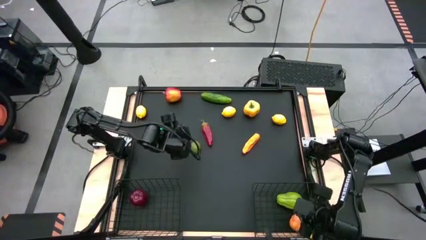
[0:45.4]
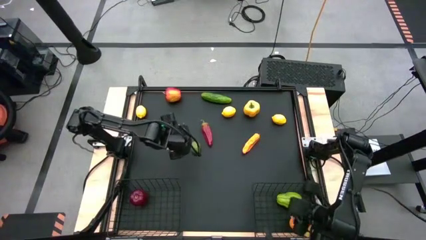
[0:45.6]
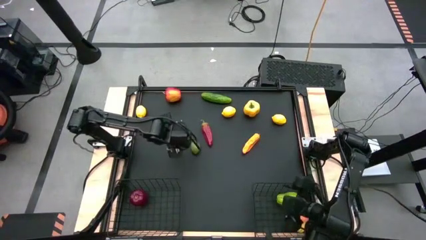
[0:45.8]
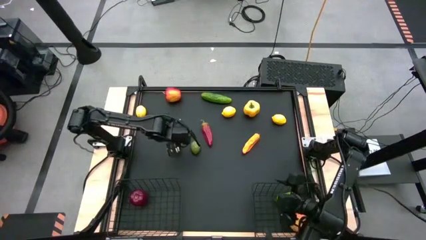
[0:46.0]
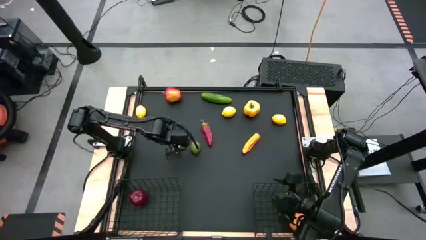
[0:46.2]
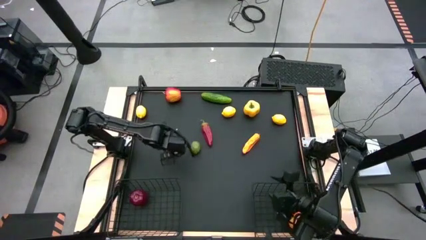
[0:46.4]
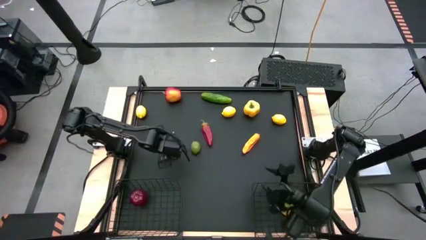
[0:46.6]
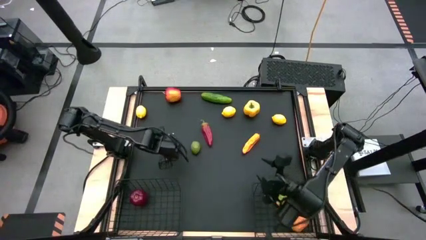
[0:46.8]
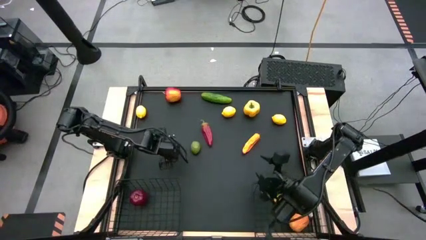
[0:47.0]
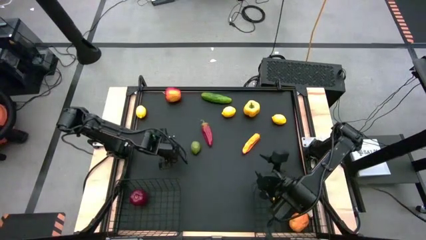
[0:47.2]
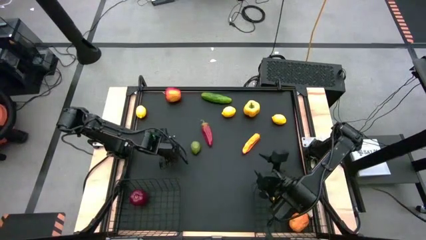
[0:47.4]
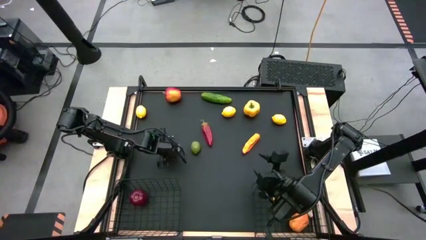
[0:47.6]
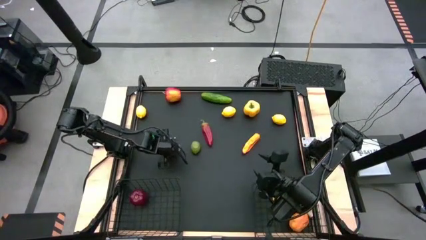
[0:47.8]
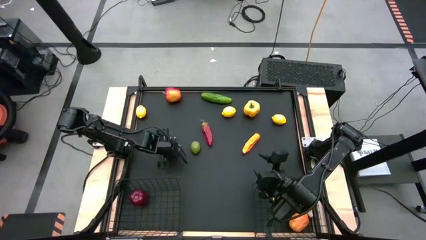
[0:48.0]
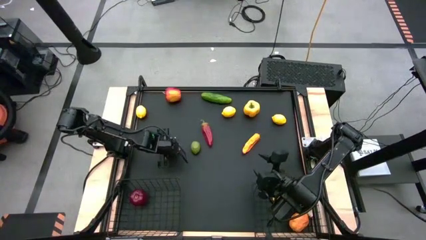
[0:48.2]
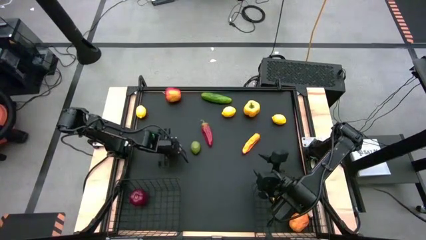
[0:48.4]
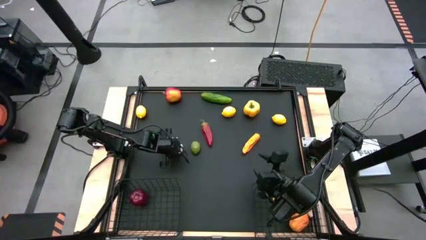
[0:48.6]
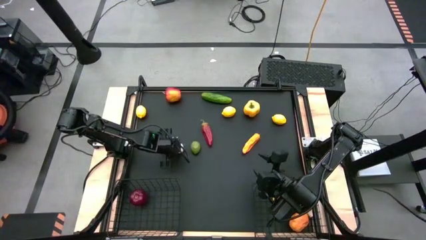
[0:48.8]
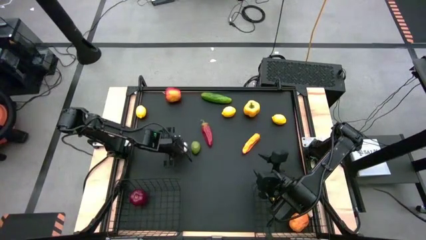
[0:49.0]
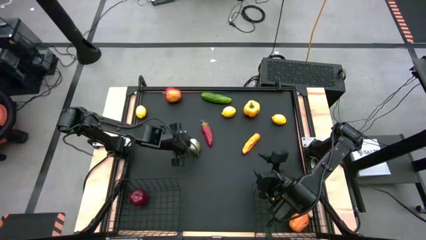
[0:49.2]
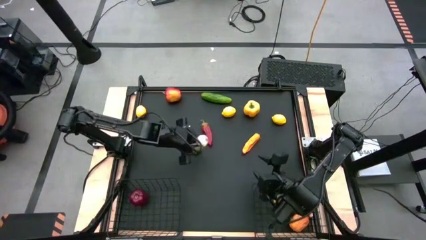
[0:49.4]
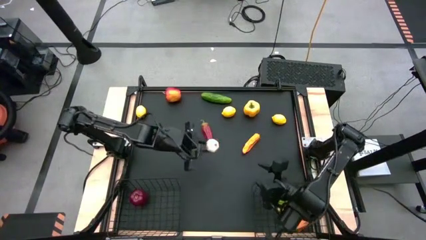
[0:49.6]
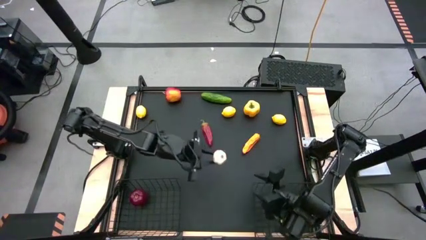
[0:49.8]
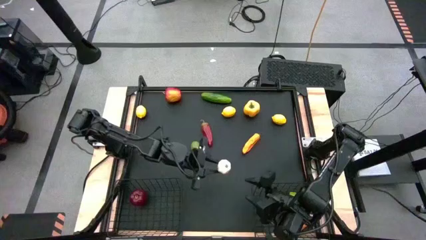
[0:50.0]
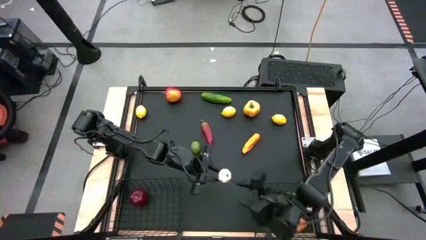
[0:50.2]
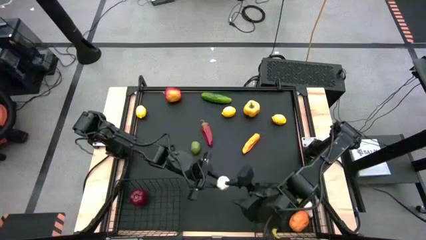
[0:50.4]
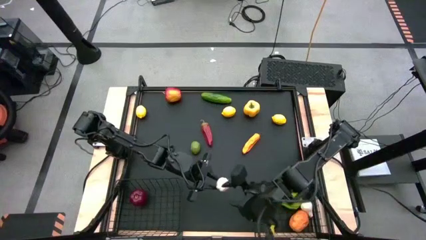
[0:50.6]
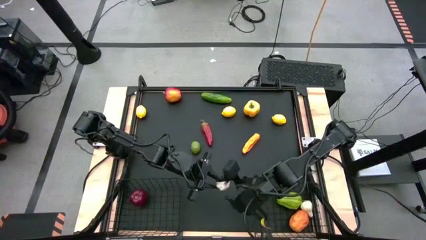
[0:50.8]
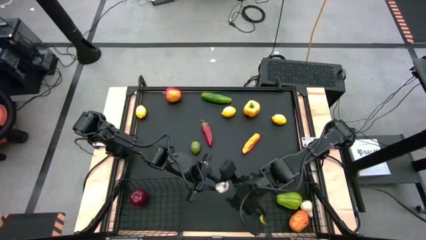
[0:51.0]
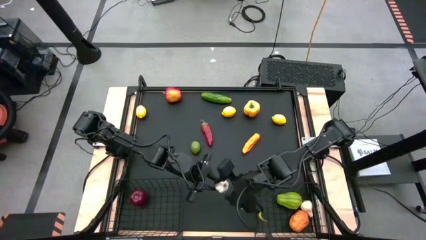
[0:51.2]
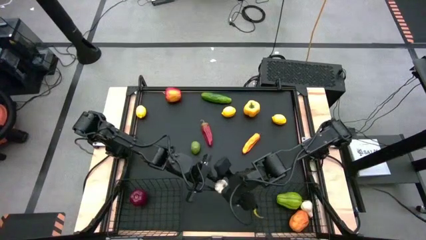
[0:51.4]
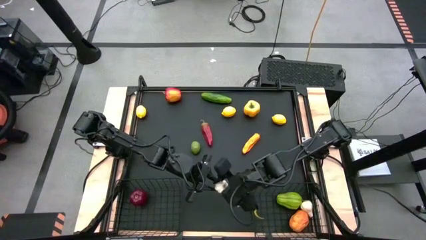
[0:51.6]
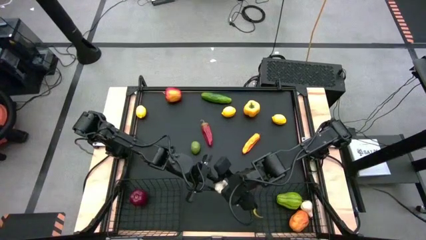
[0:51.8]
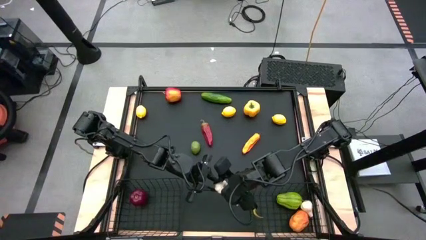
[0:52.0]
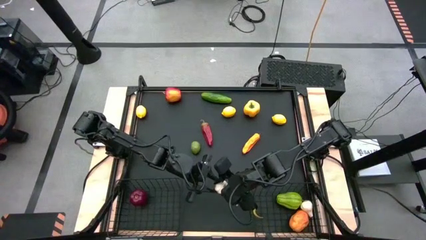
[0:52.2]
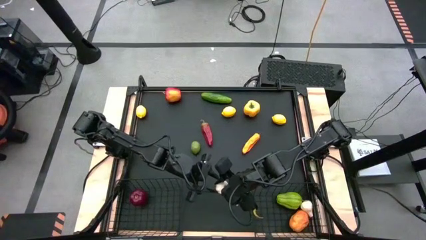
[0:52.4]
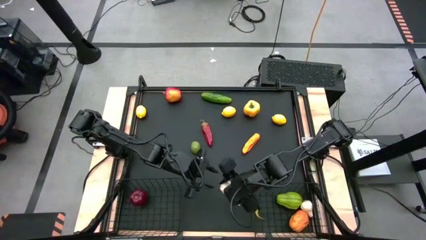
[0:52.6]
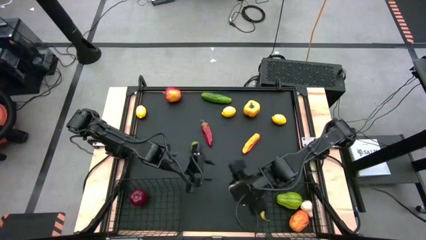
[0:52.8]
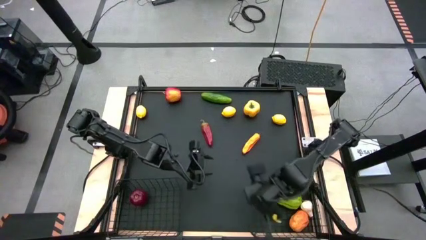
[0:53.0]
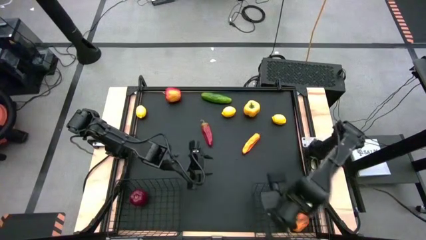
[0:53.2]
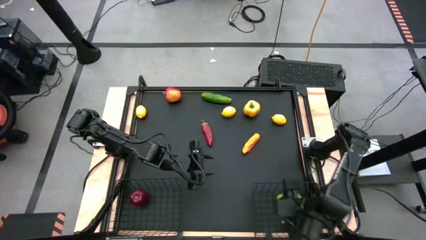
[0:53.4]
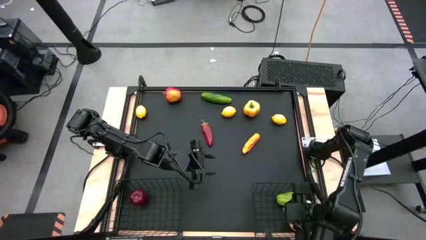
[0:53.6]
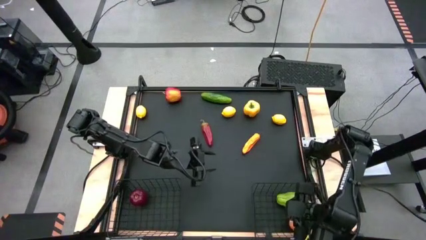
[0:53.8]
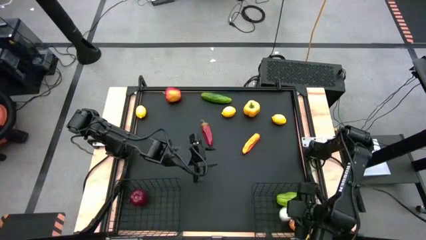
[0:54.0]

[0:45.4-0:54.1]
Task: Sort produce into baskets
Put the white garlic into the right wire basket

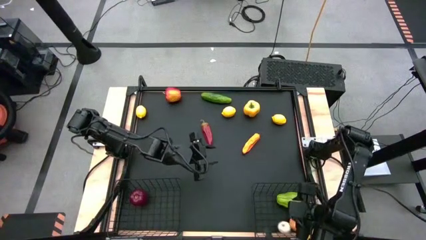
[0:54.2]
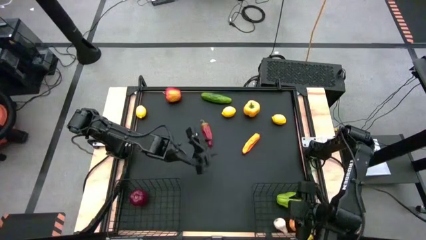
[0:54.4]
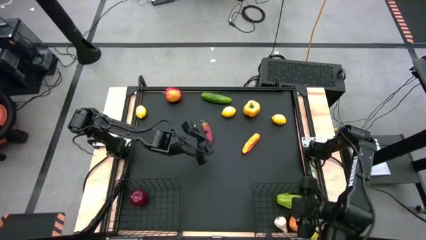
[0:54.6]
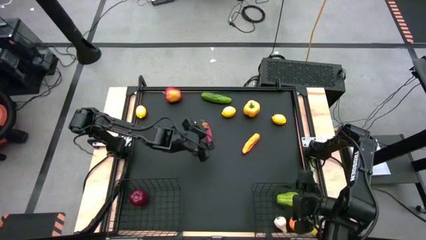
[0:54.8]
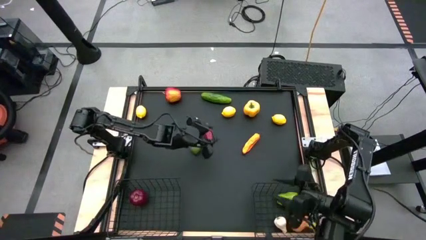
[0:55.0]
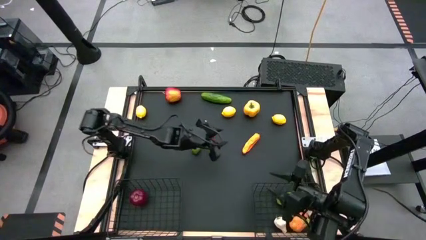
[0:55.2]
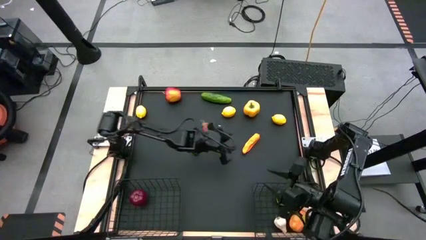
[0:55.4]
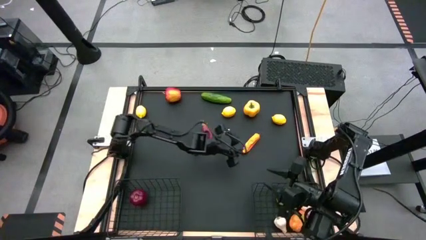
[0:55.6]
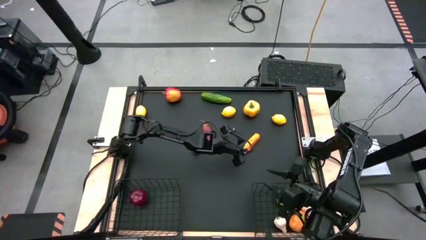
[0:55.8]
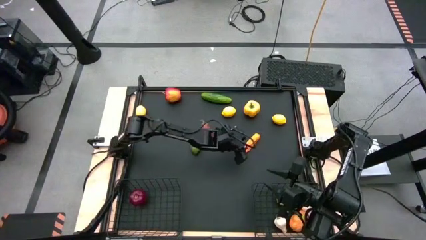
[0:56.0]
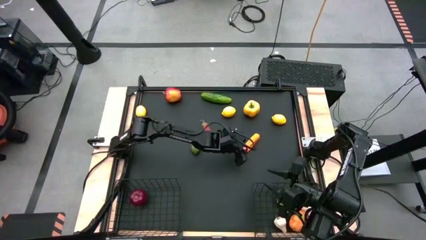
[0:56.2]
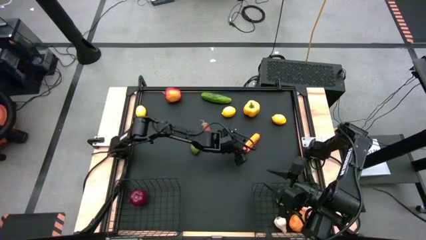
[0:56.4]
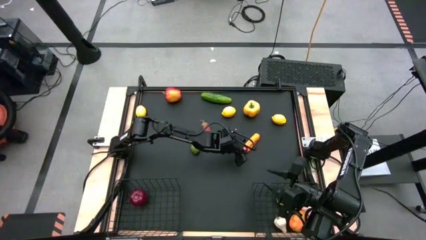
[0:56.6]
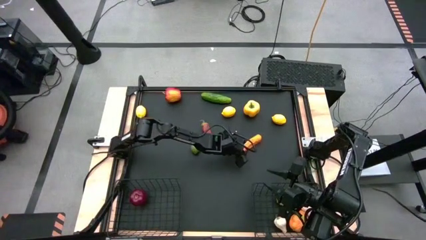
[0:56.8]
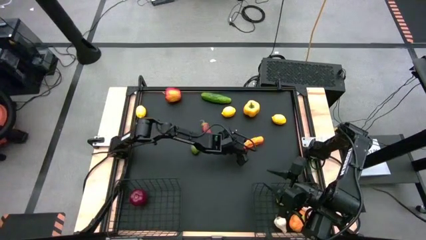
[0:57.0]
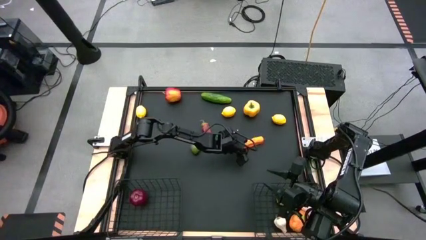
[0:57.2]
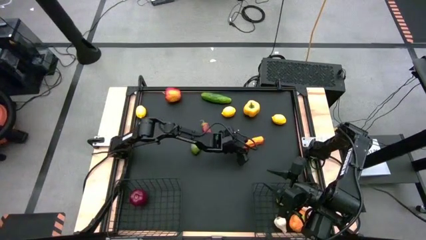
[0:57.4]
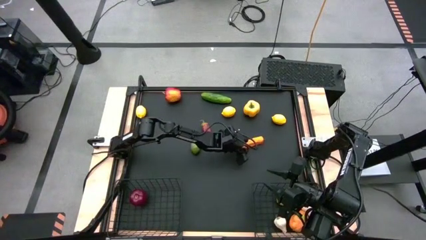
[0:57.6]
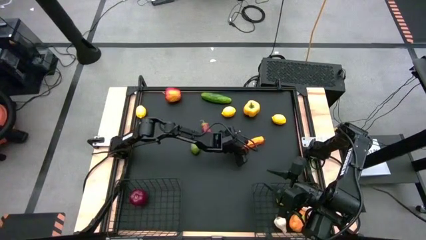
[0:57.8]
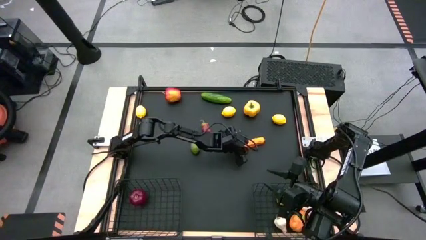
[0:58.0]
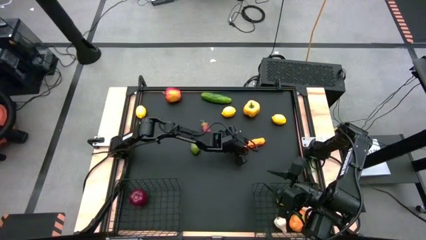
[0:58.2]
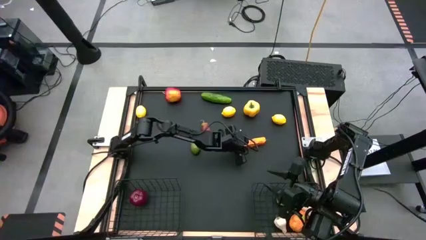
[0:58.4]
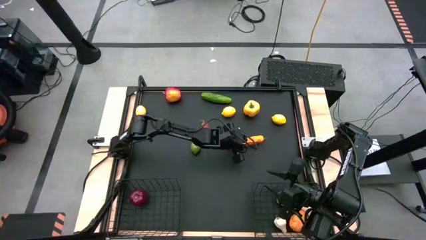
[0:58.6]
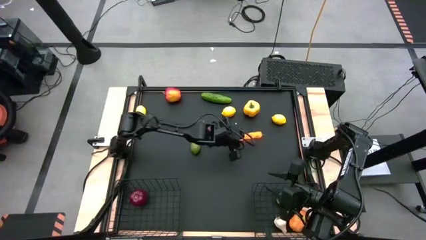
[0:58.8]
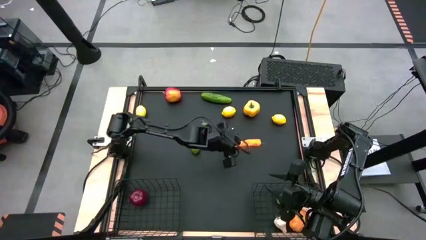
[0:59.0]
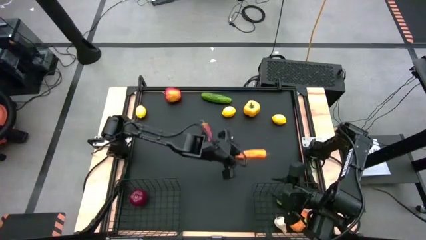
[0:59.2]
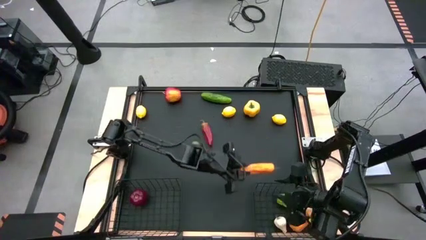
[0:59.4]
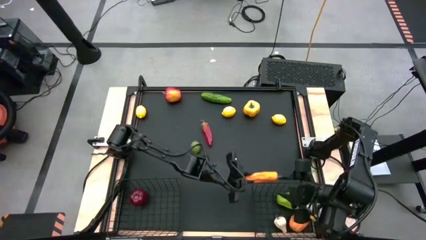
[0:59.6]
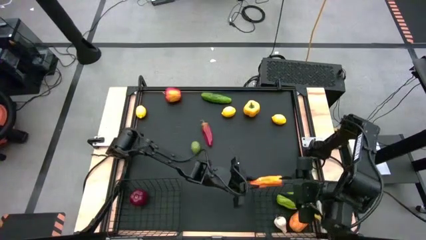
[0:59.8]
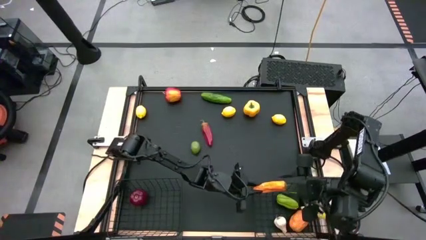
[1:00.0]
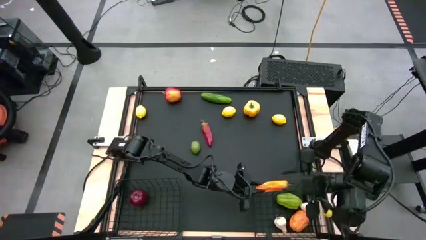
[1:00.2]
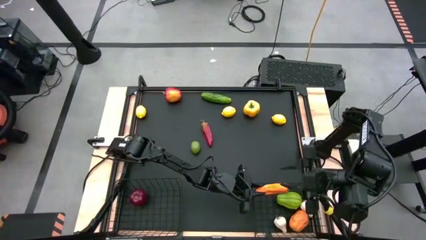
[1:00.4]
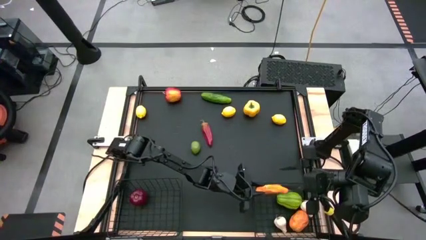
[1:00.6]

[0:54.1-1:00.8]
Put the yellow chili pepper into the right wire basket

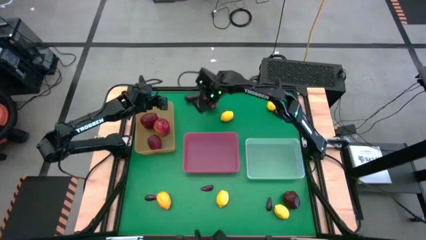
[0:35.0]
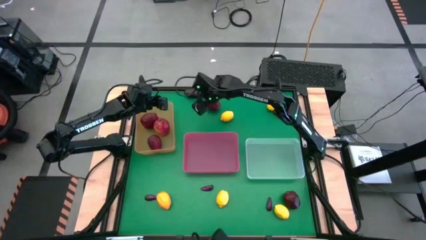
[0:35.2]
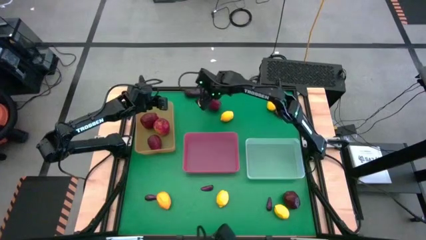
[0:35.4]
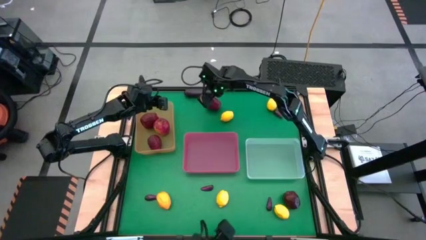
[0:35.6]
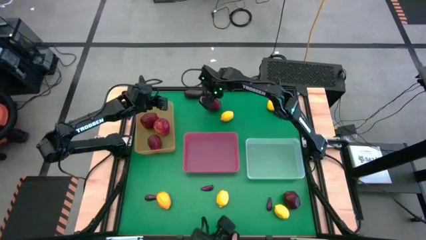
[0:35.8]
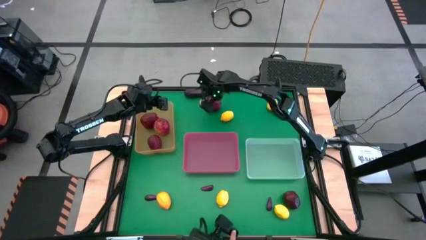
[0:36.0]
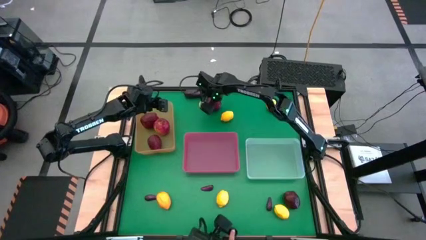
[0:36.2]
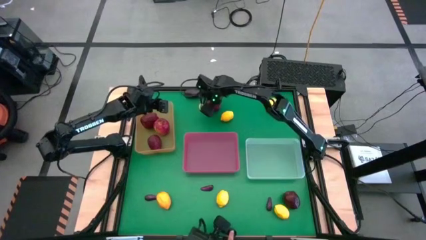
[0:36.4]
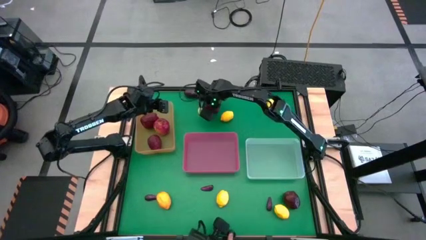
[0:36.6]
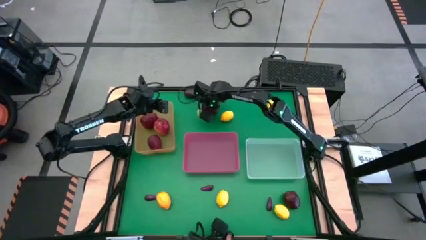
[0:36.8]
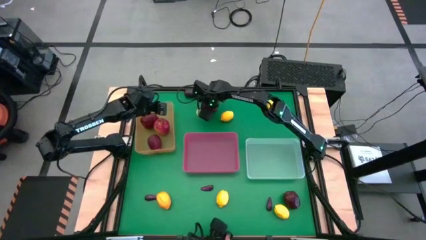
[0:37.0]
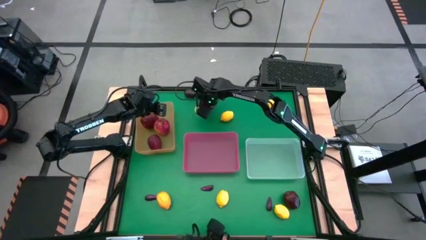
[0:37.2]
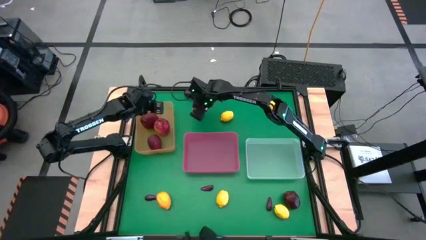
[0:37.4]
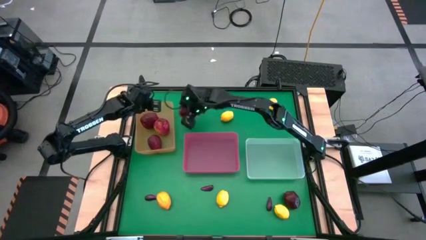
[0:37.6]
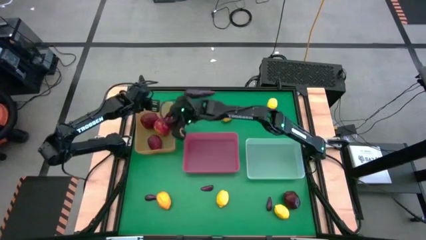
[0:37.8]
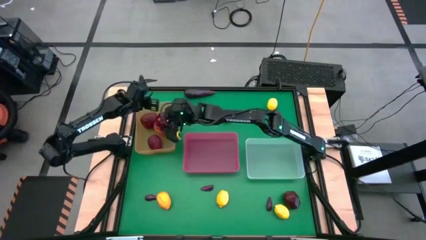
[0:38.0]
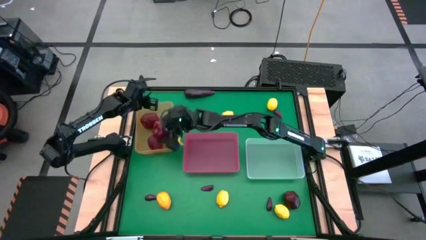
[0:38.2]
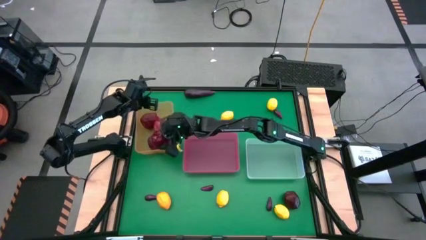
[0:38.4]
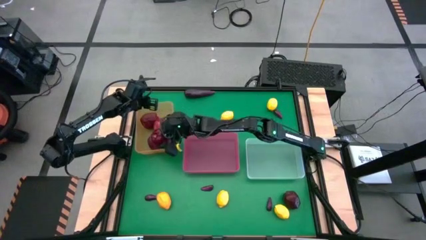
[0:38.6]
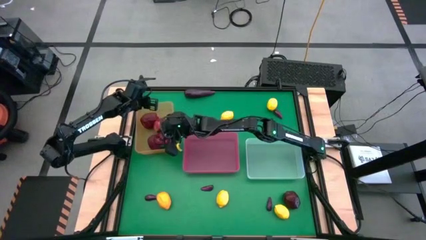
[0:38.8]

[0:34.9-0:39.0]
Task: Sort produce into baskets
Put the red apple into the orange bin
